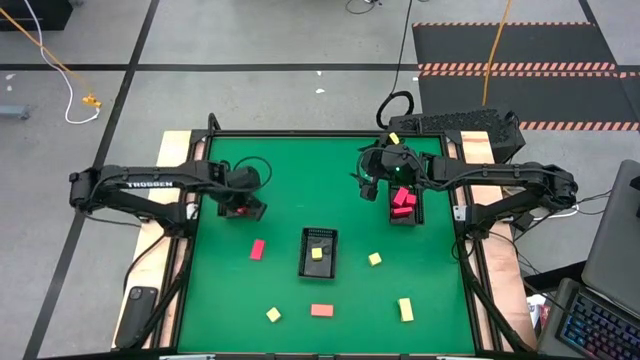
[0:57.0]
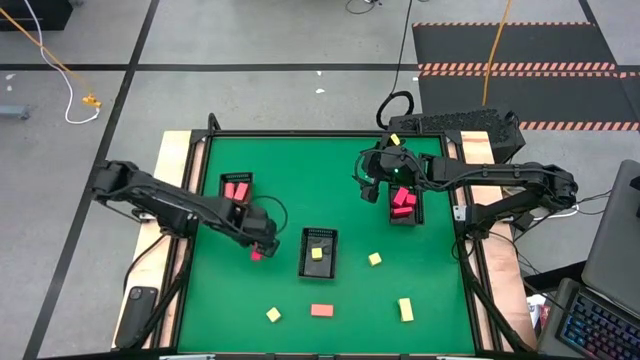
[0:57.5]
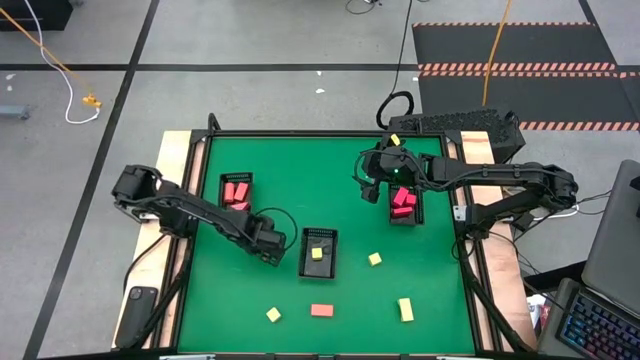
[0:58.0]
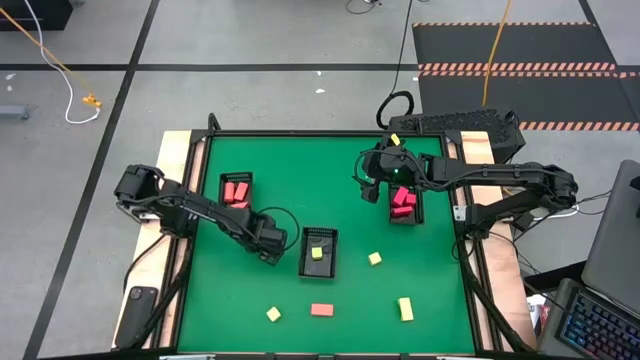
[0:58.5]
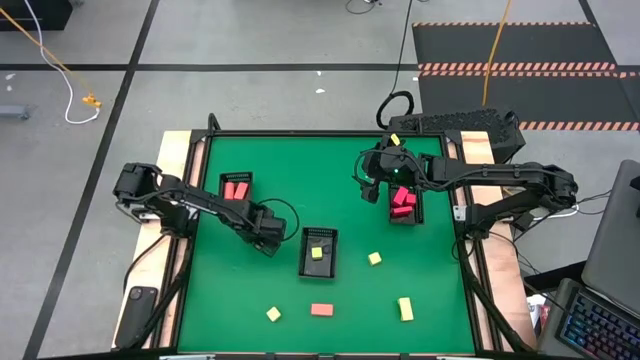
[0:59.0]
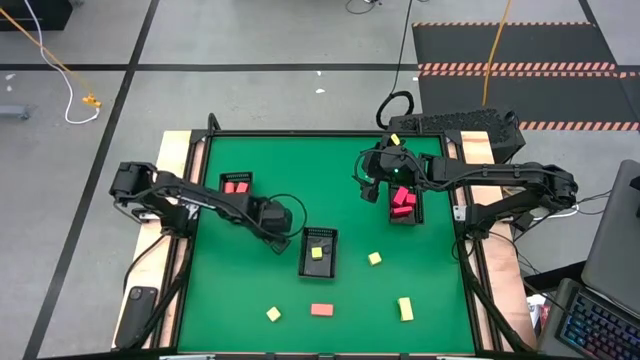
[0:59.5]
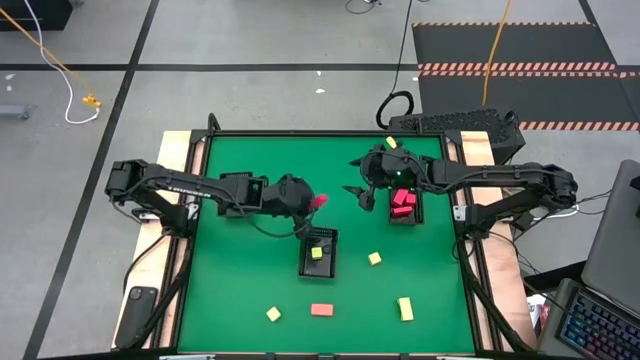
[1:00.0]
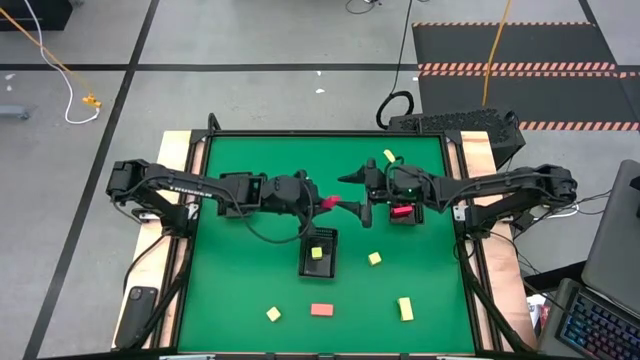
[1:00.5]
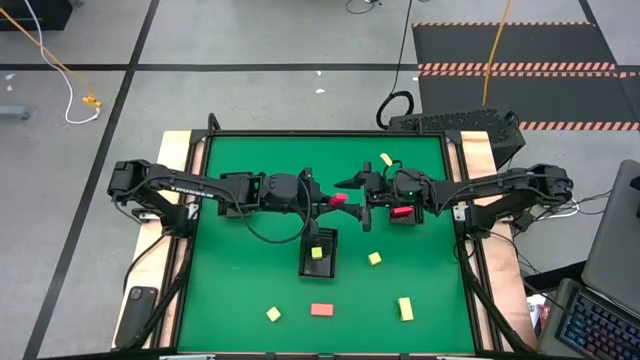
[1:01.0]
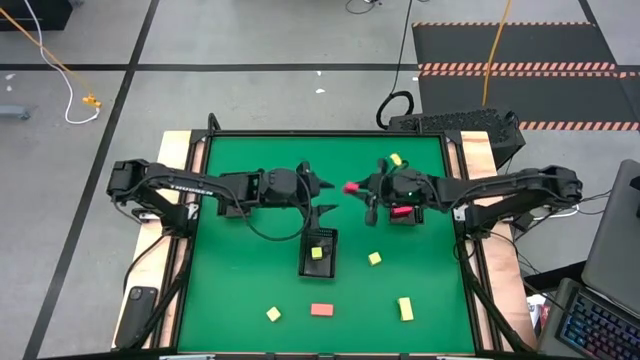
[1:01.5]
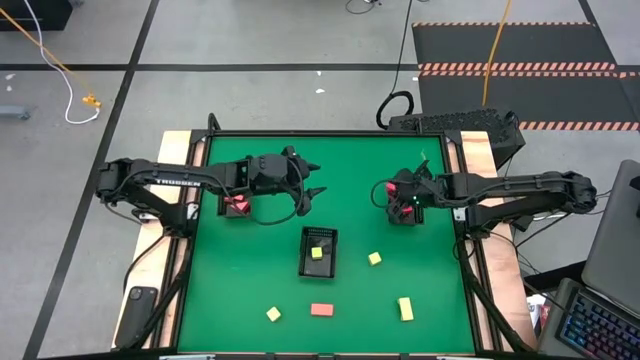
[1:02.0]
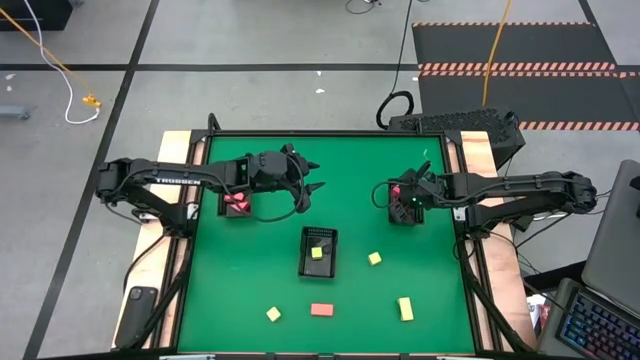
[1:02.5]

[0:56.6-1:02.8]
Task: Sort & place blocks by color
Put the red block into the top right black basket

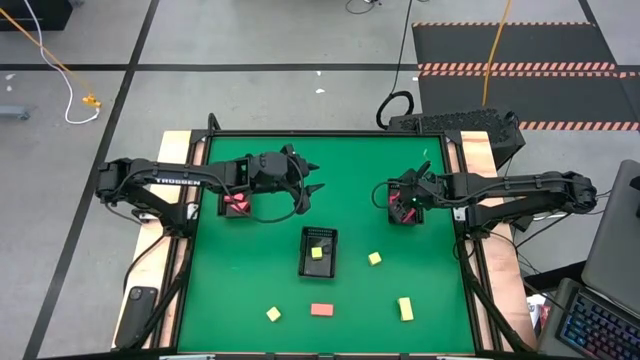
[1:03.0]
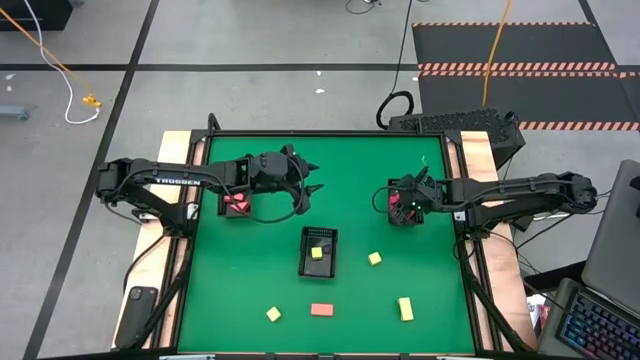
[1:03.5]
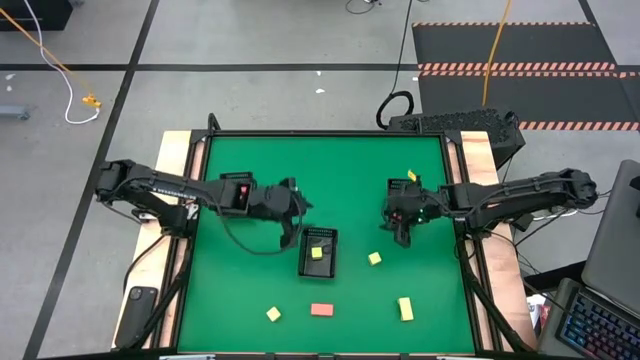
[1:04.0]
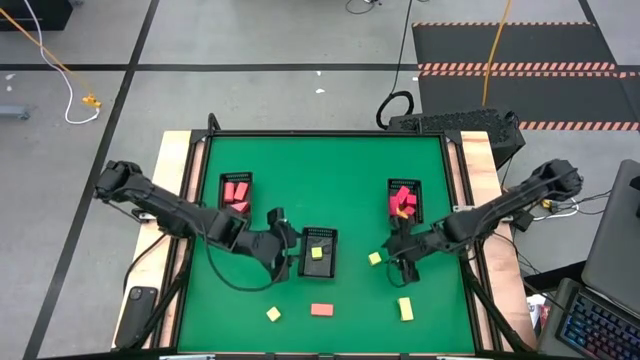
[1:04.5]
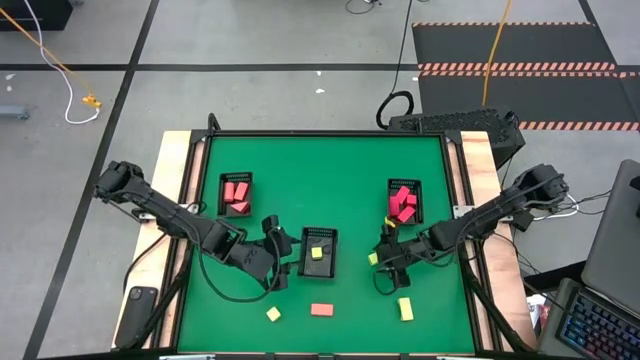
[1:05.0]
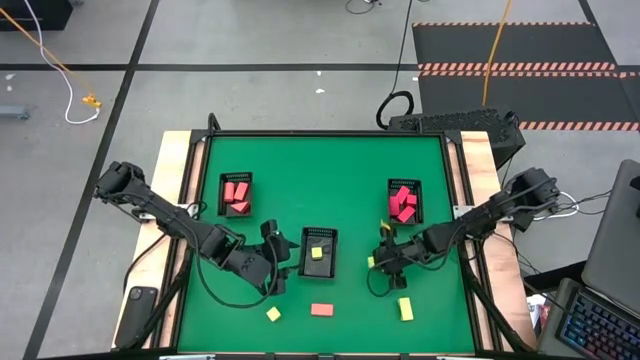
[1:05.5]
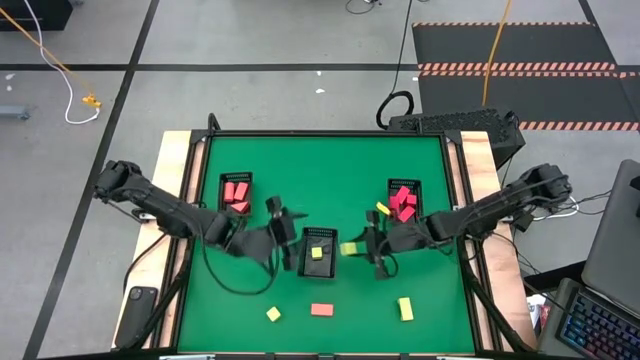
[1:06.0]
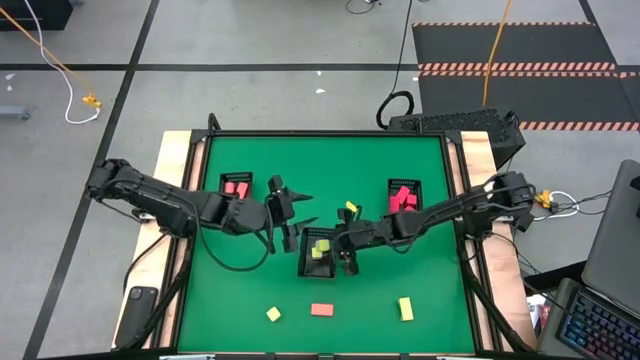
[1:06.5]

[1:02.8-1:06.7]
Put the light green block into the center black basket

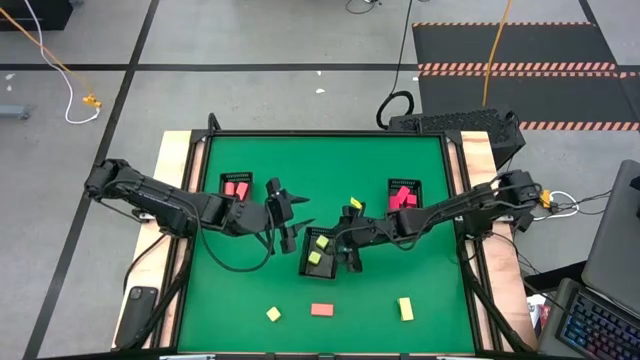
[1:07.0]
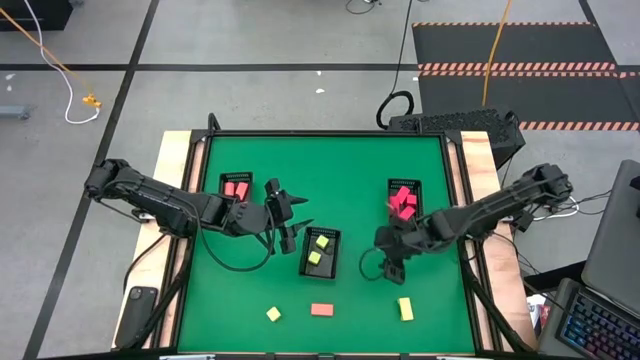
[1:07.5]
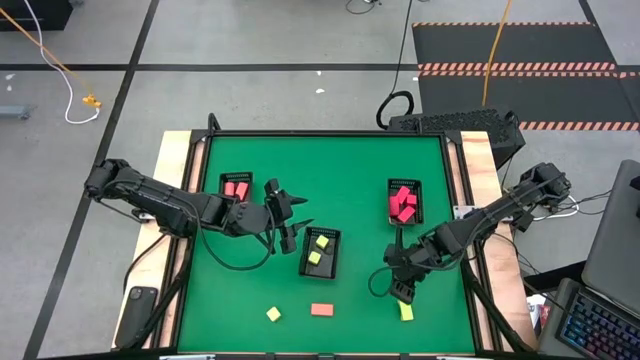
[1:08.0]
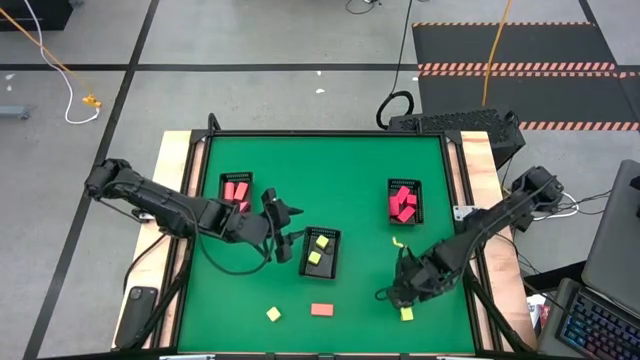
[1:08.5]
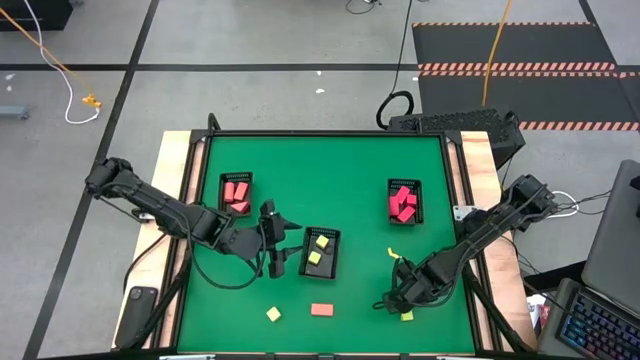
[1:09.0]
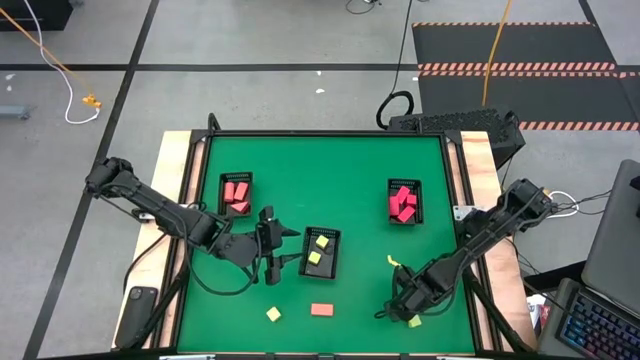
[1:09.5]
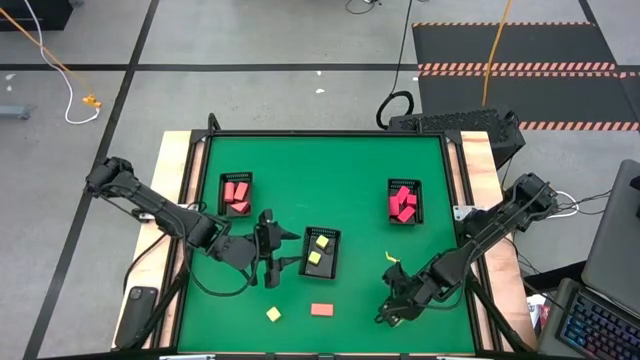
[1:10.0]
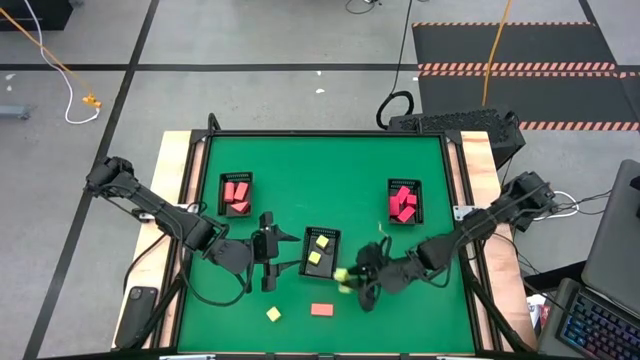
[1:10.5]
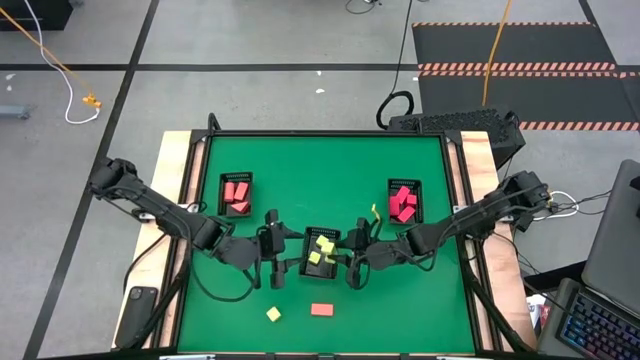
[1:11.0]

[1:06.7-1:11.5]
Put the light green block into the center black basket

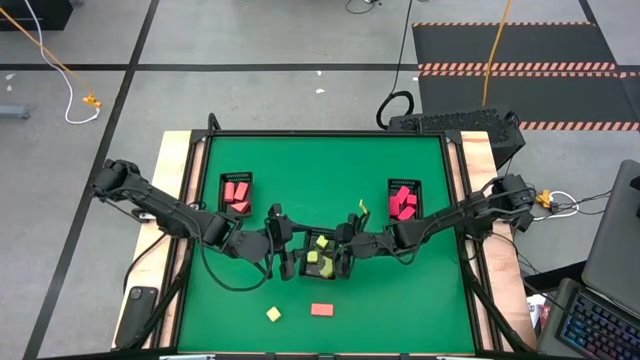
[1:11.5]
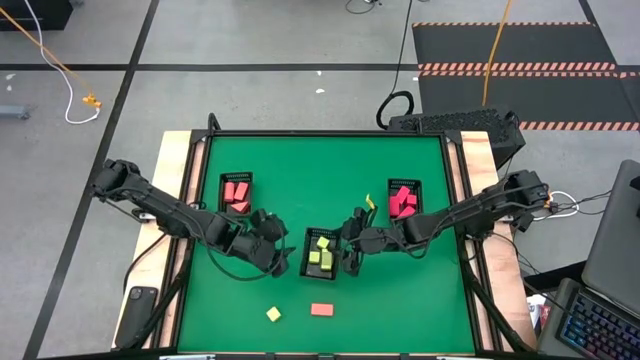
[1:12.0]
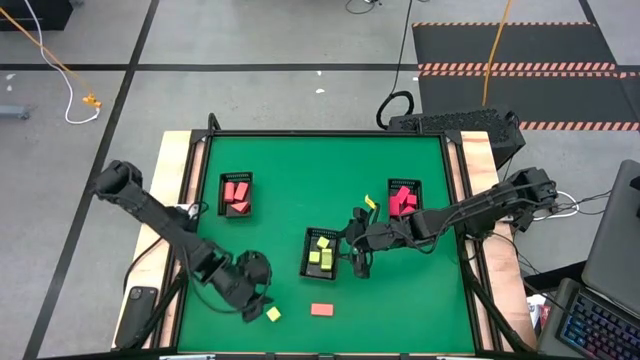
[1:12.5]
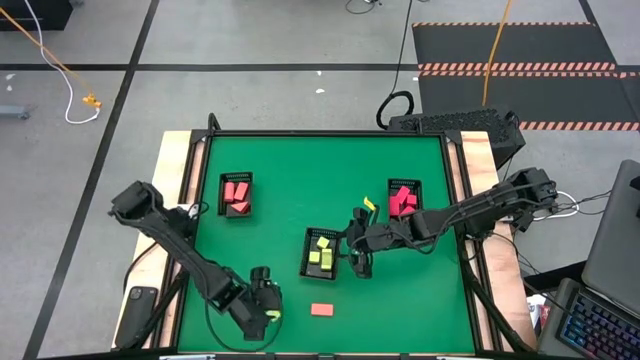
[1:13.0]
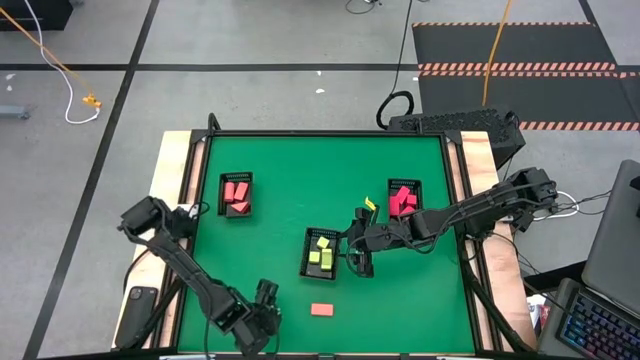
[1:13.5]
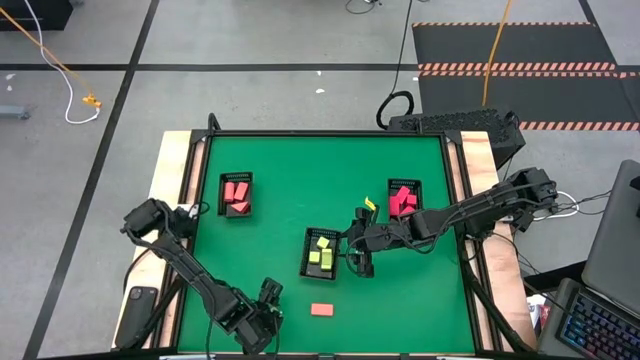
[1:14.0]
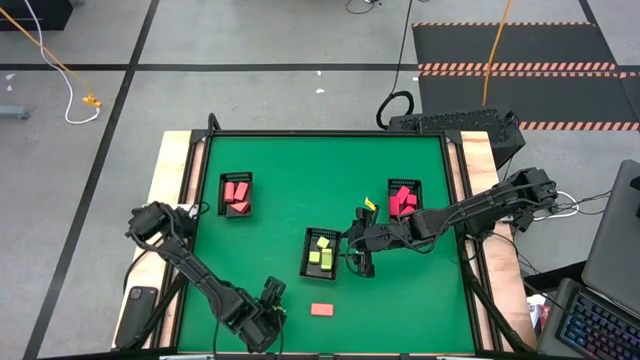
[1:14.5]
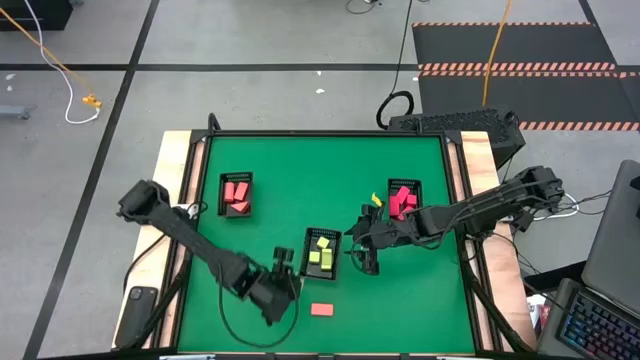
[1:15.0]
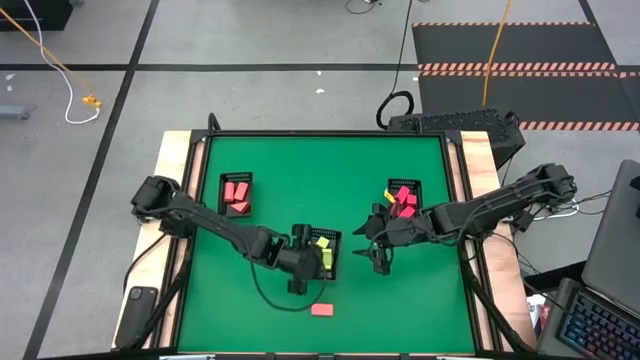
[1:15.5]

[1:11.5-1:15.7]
Put the light green block into the center black basket

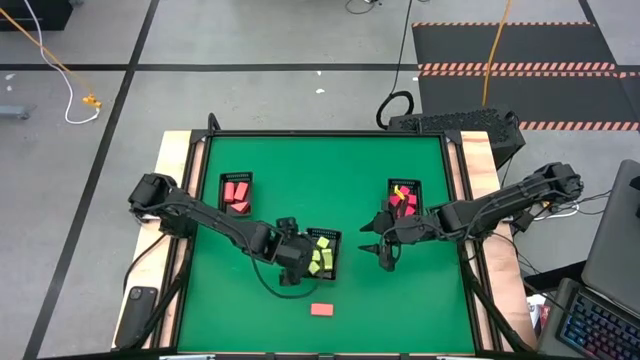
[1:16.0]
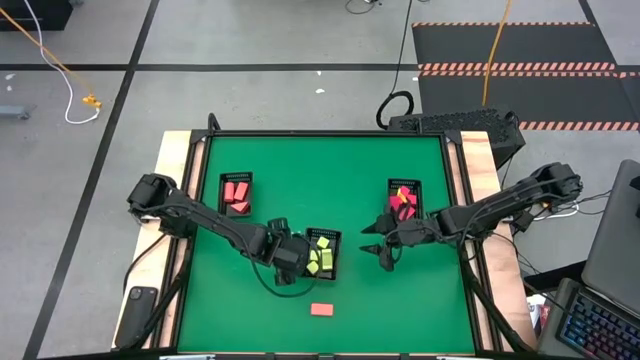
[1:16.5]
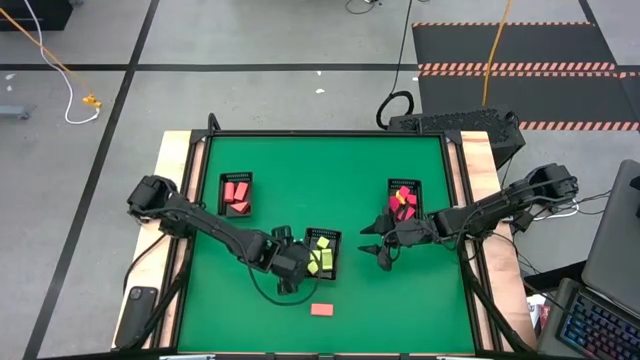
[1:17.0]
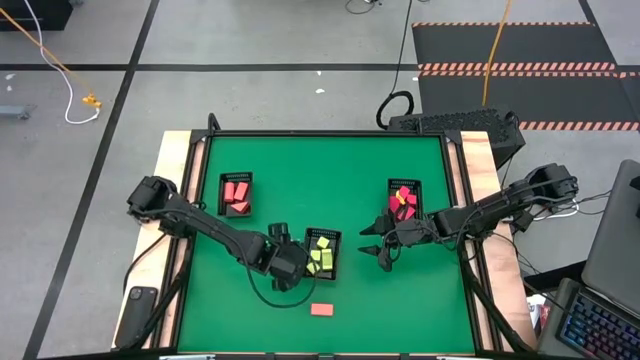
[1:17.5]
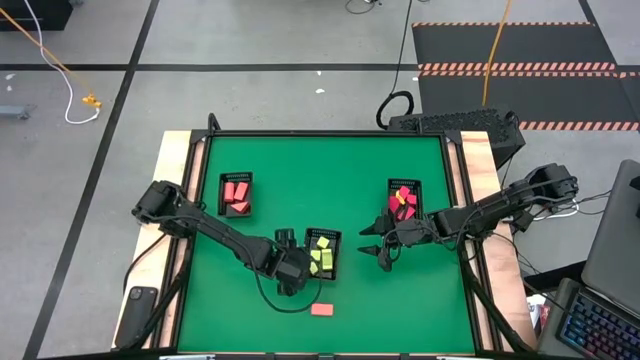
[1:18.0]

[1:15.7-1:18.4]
Adjust the black basket
